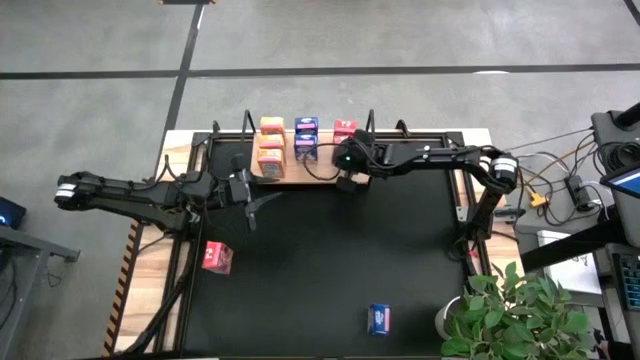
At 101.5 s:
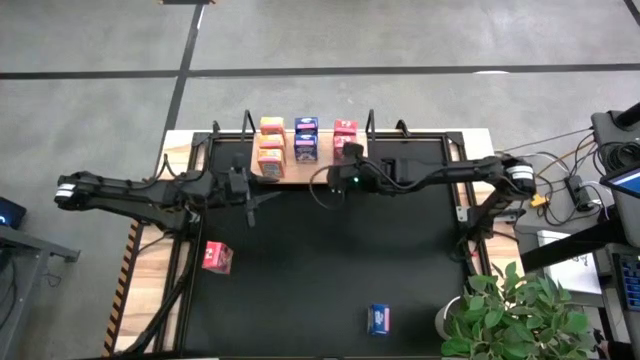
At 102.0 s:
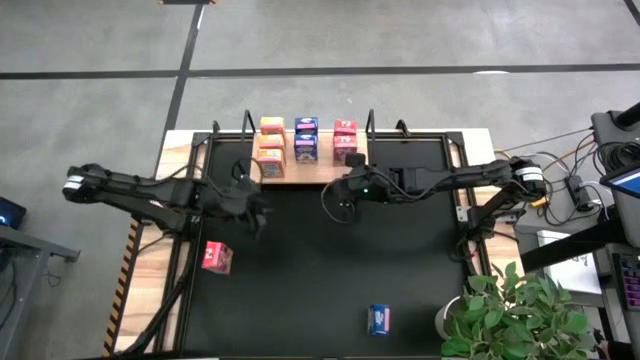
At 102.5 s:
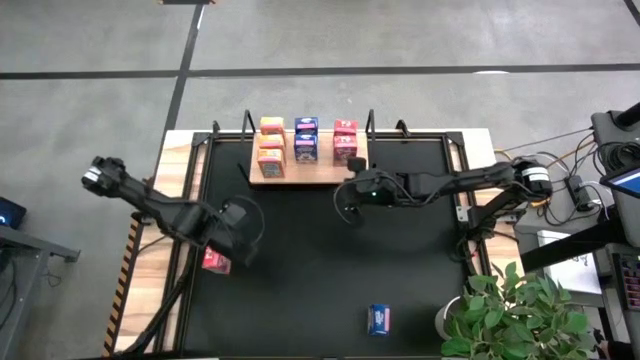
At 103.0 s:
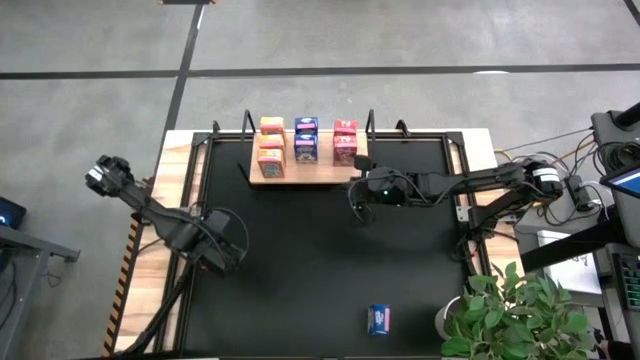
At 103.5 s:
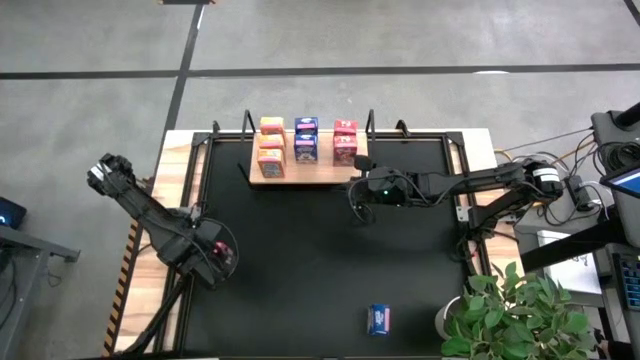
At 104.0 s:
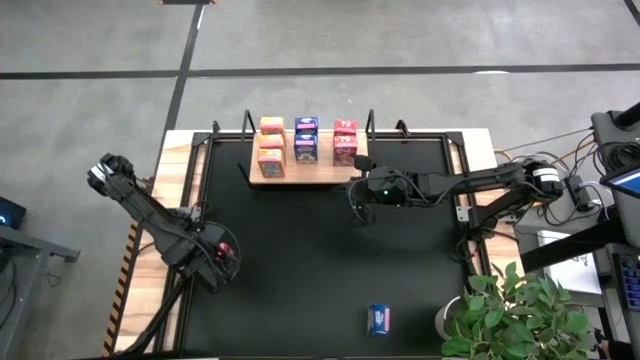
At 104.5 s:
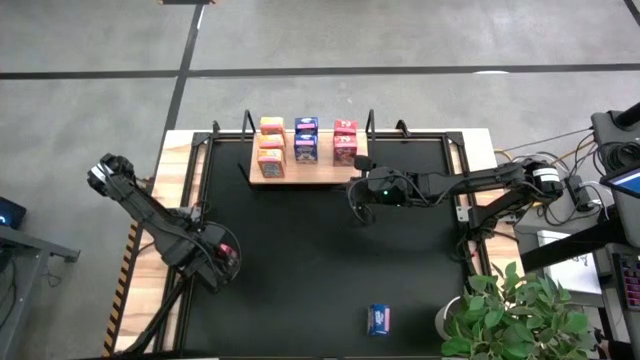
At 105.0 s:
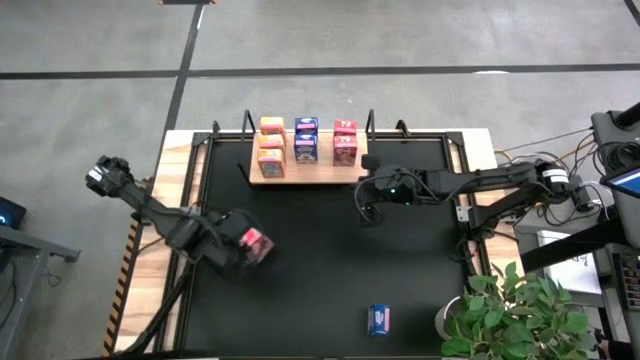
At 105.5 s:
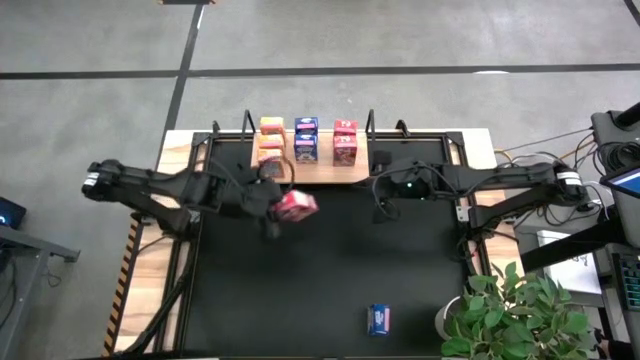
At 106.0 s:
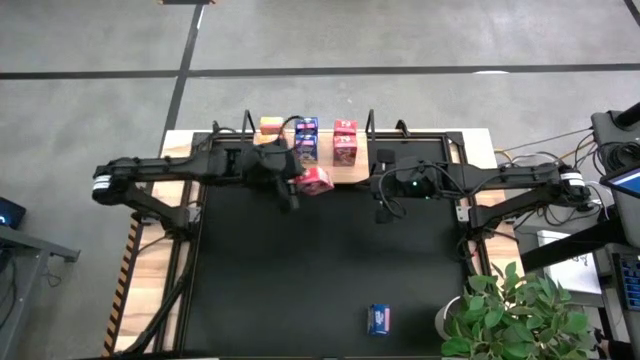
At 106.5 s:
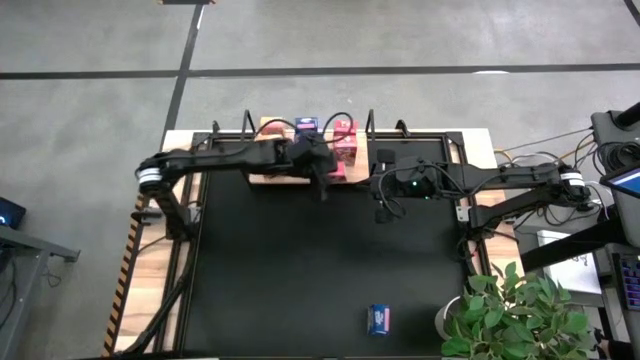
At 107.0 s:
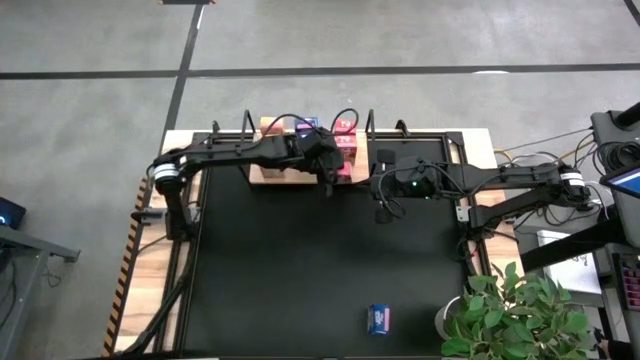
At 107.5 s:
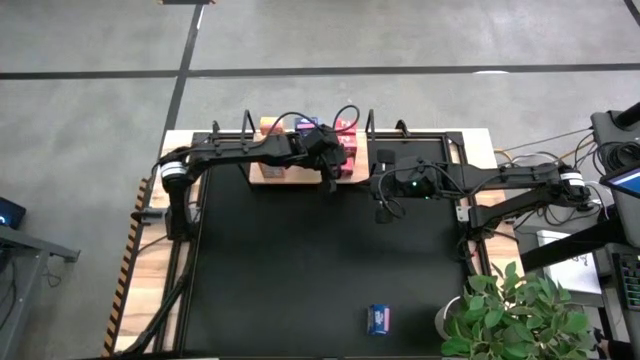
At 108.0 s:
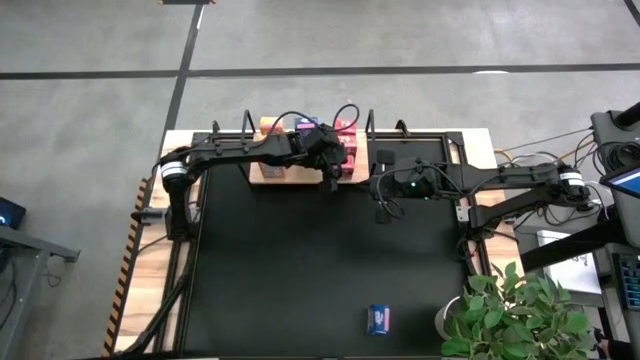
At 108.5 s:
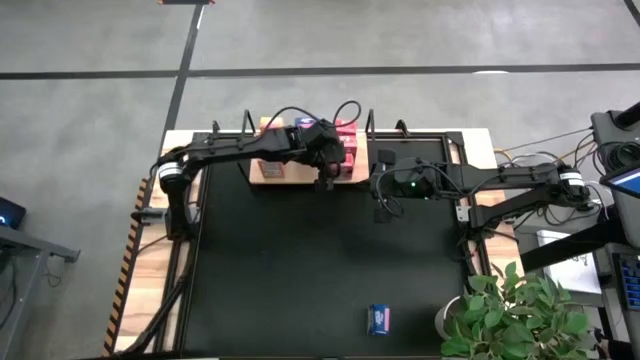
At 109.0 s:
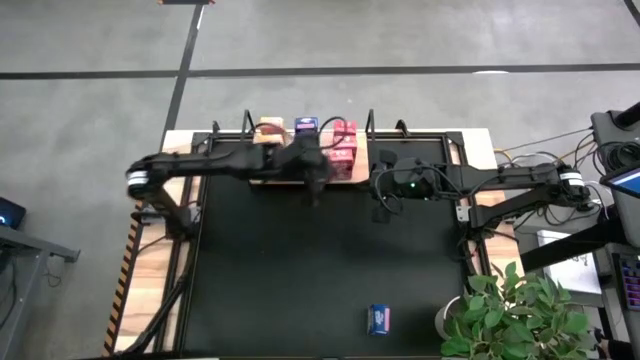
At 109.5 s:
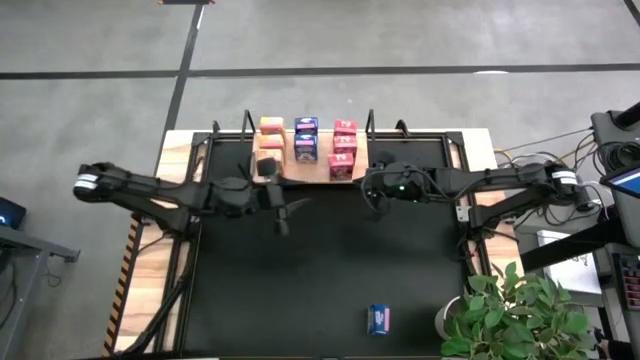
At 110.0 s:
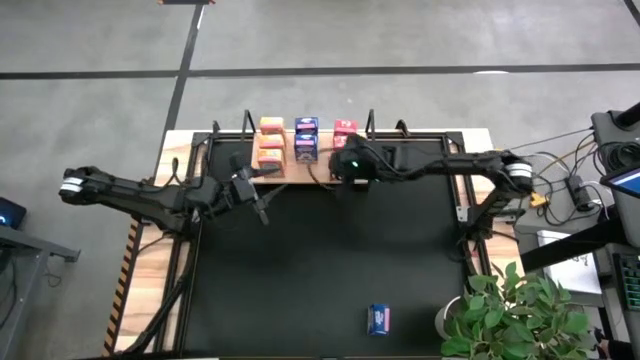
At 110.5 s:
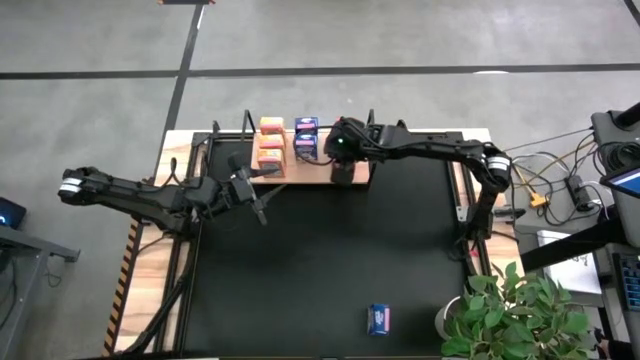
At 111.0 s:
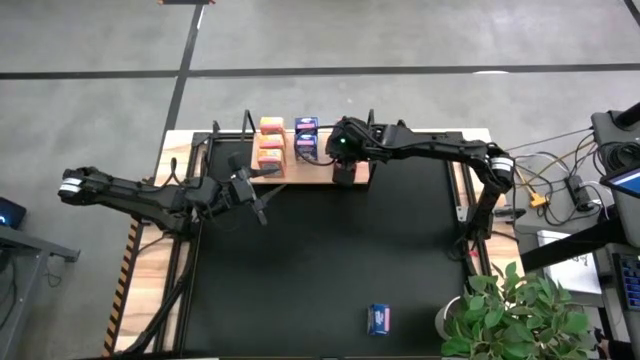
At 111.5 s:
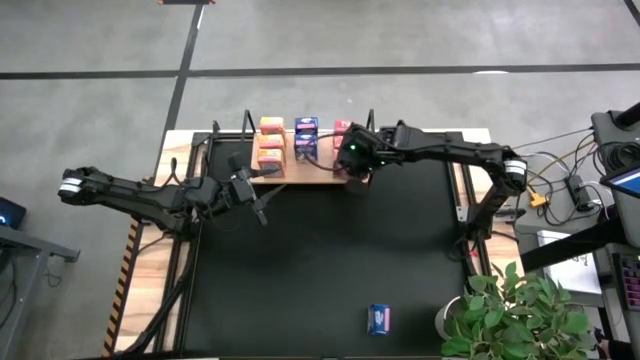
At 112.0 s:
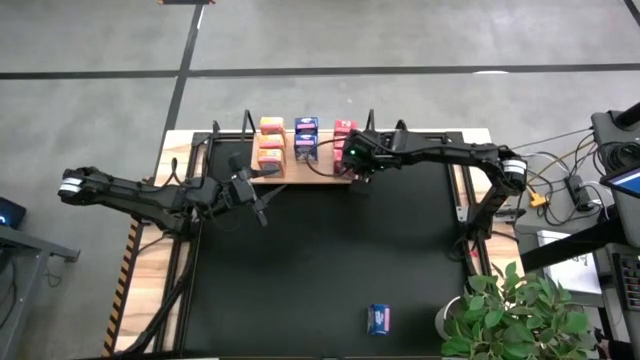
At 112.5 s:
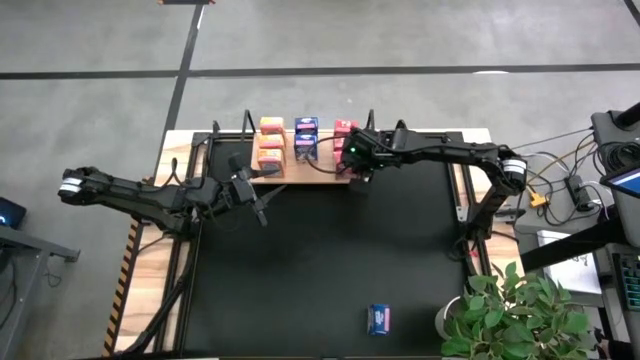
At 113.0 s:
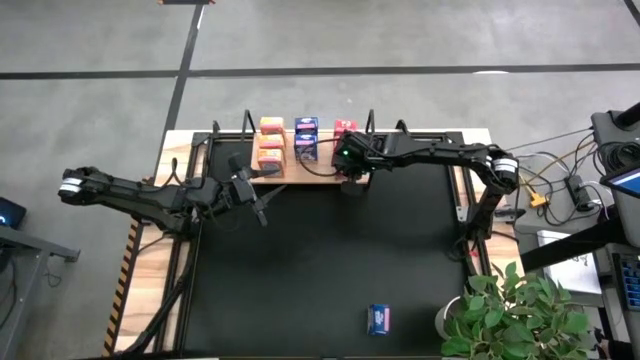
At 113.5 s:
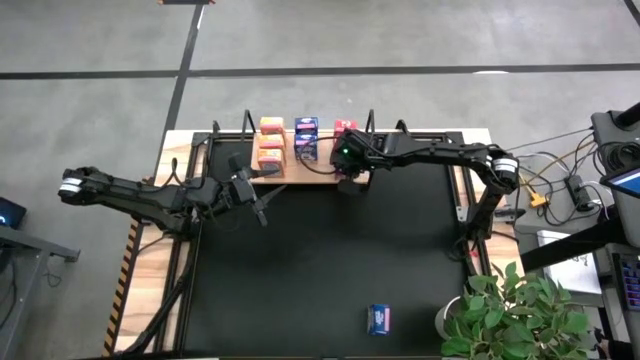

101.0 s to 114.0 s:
Task: Stack cereal on shelf
Put the red cereal box on the shelf aligned with other red cereal boxes

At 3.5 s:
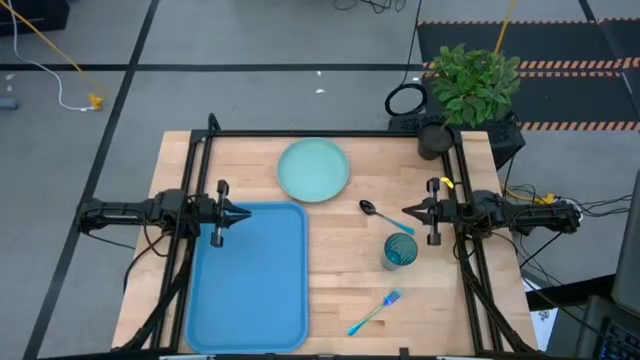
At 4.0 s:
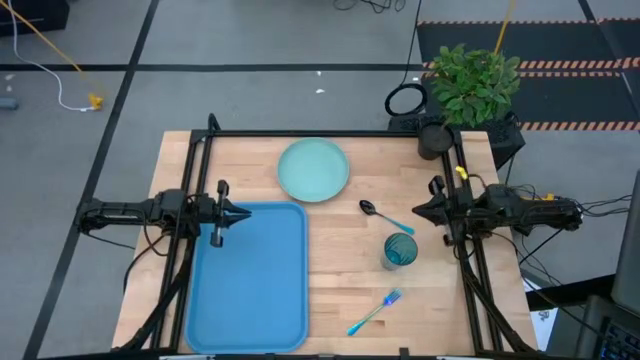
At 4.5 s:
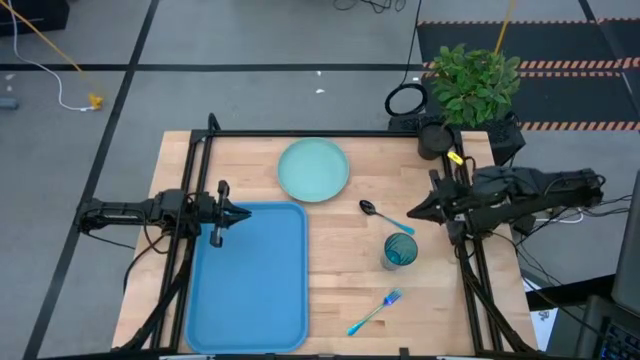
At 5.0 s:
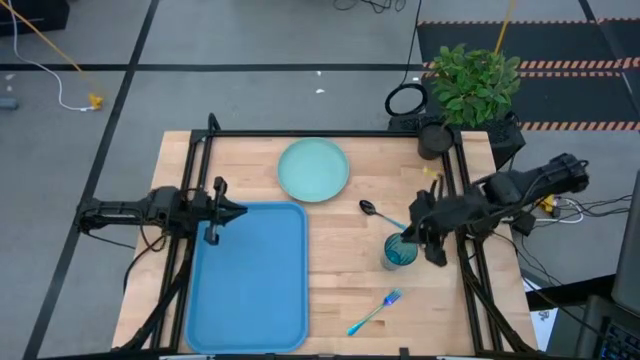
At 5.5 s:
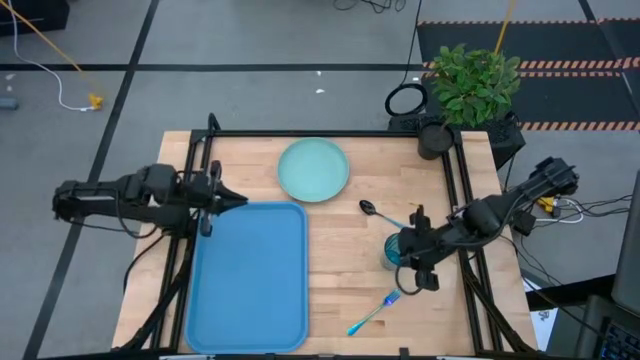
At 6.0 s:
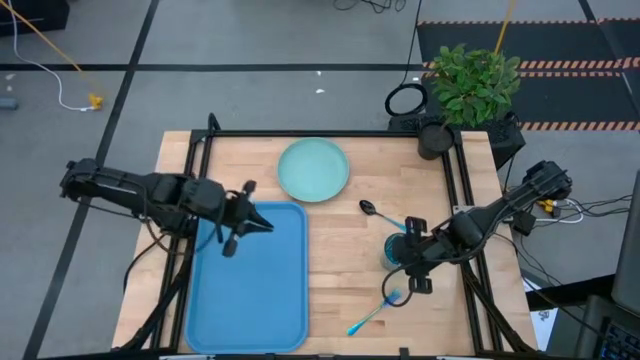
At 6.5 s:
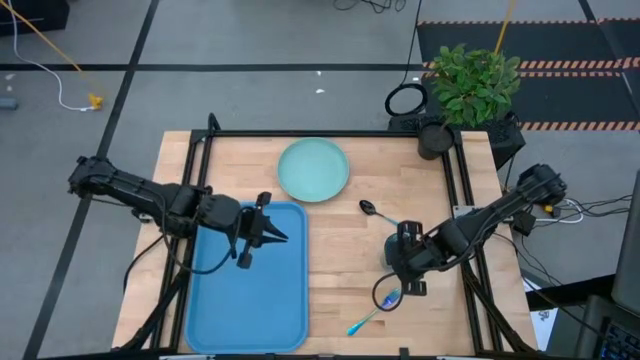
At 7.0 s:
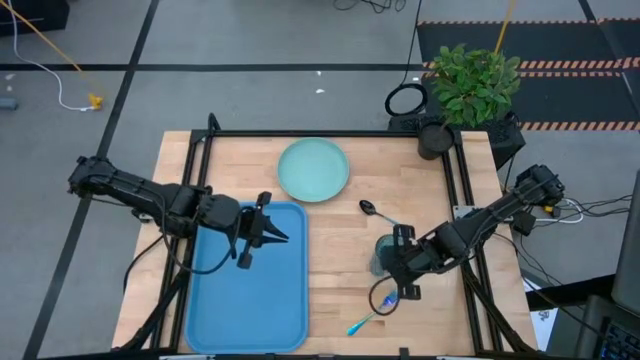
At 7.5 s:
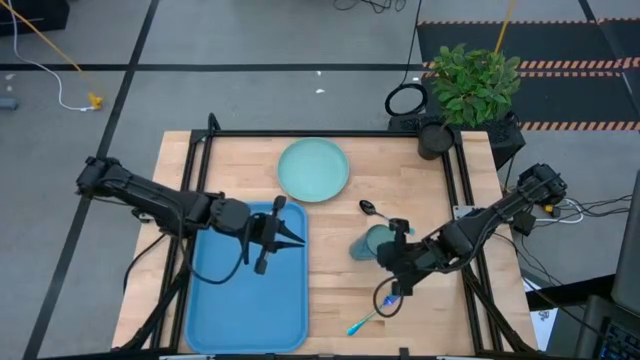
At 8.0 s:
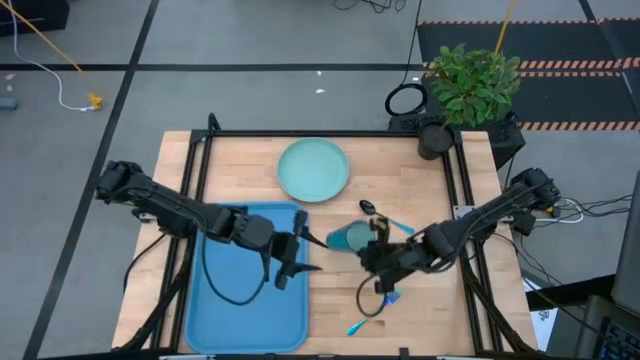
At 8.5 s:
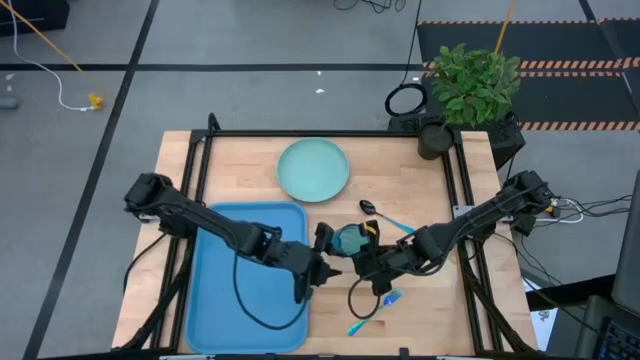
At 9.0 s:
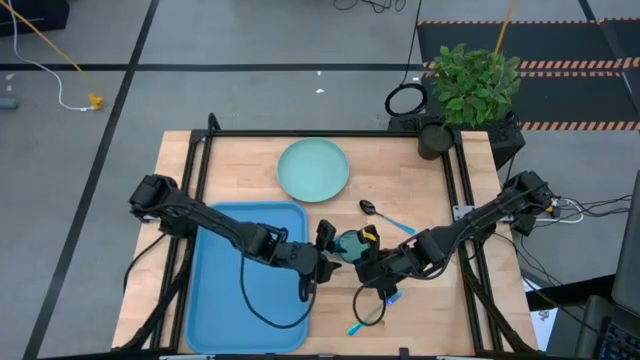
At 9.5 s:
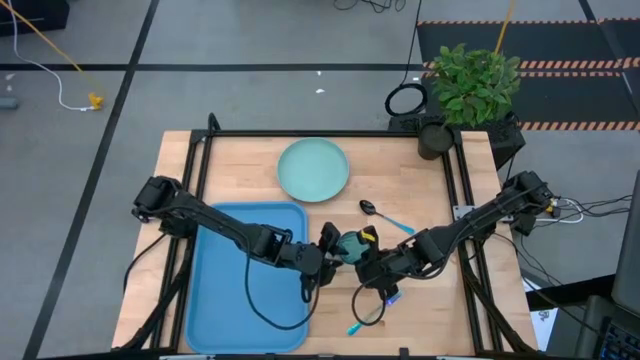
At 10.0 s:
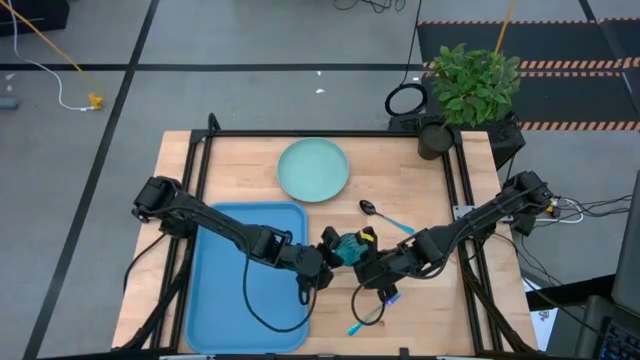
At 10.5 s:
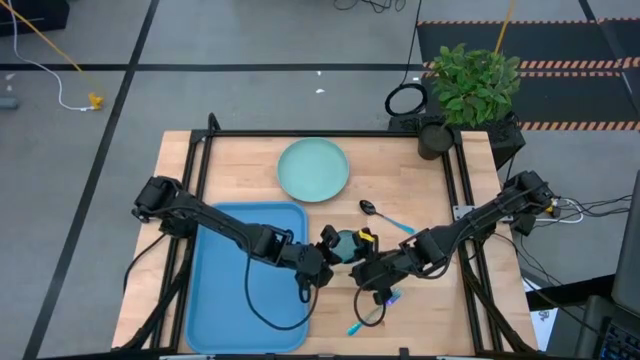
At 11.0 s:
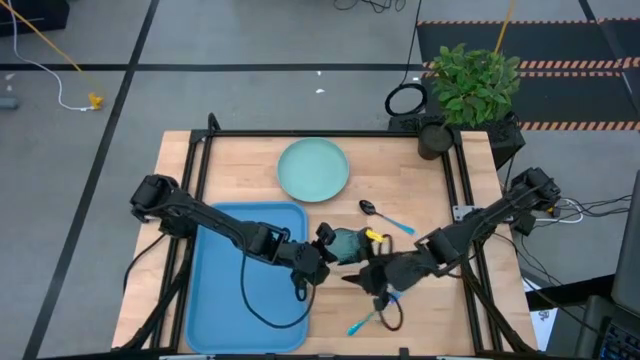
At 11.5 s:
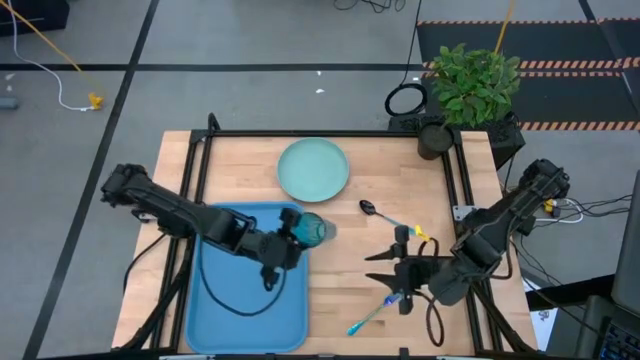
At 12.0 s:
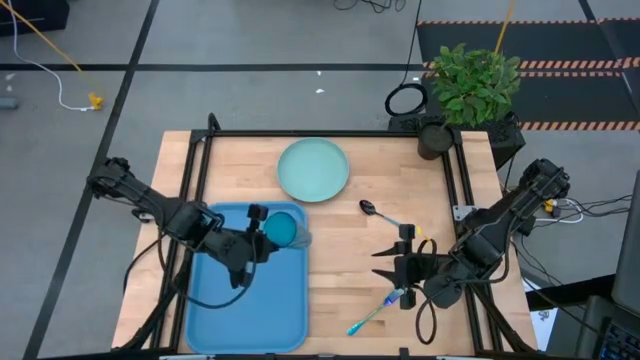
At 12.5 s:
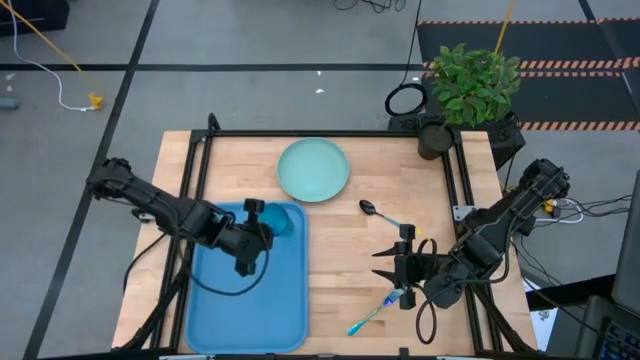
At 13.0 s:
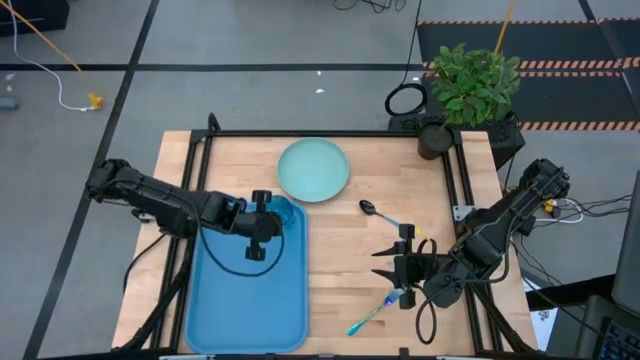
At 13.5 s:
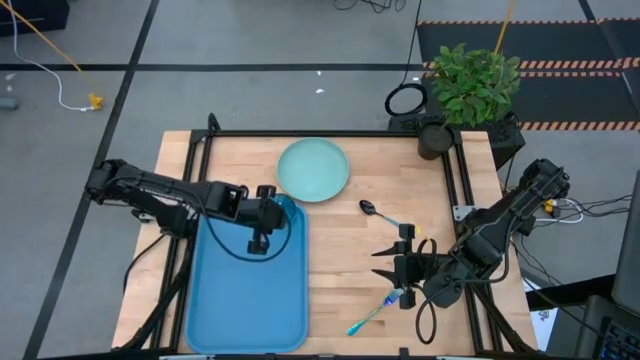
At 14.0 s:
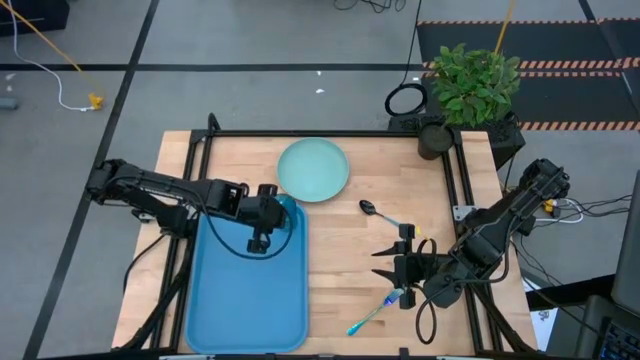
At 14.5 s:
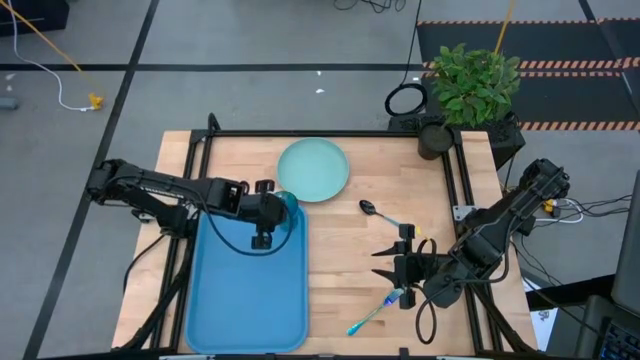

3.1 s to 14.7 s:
Task: Pick and place plate/cup/fork/spoon on tray
Put the blue cup on the blue serving tray
